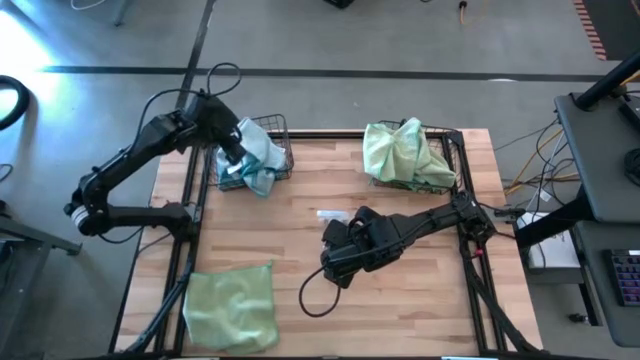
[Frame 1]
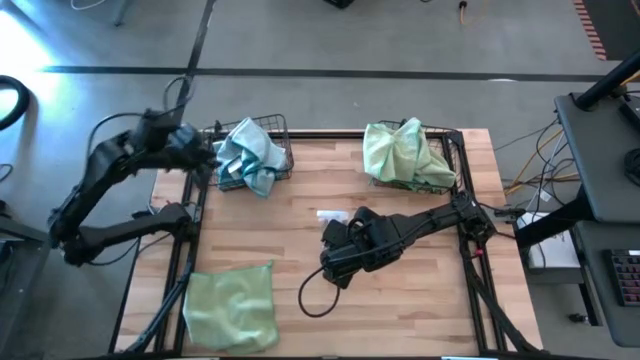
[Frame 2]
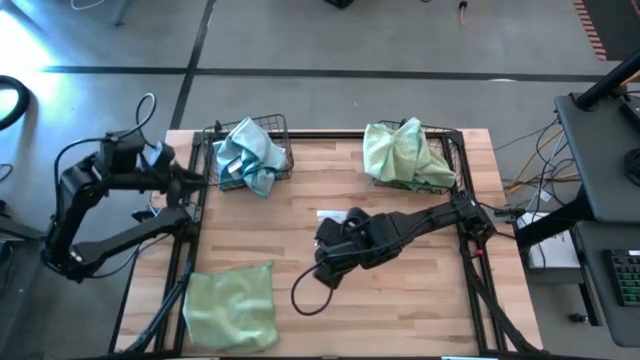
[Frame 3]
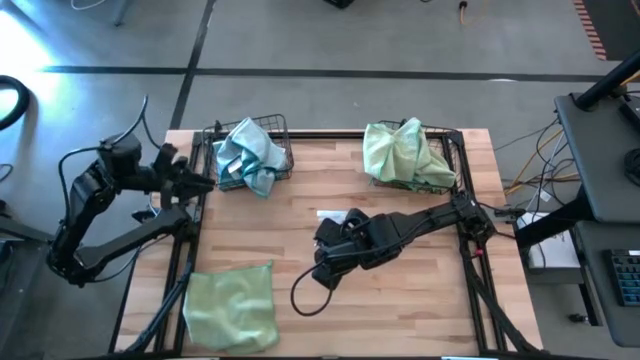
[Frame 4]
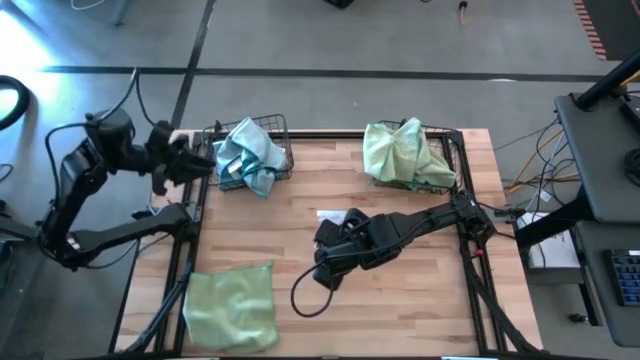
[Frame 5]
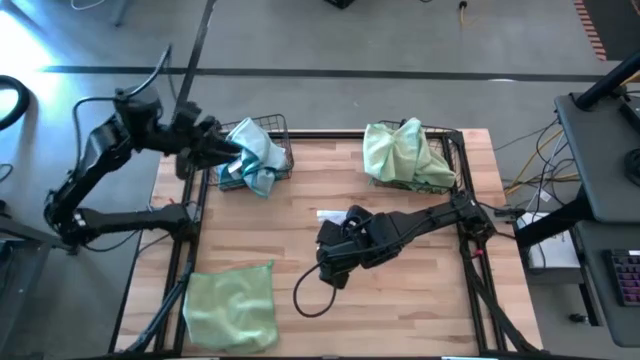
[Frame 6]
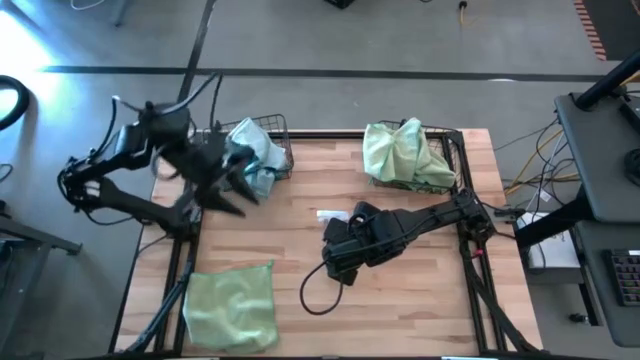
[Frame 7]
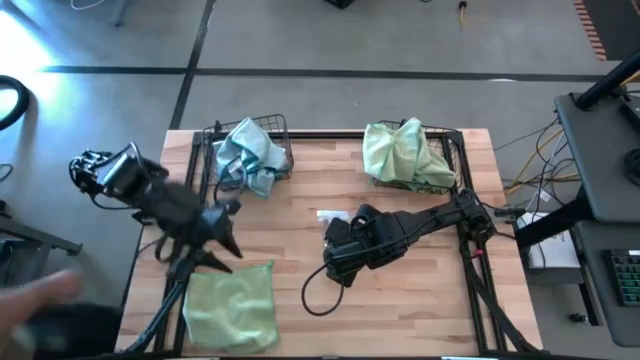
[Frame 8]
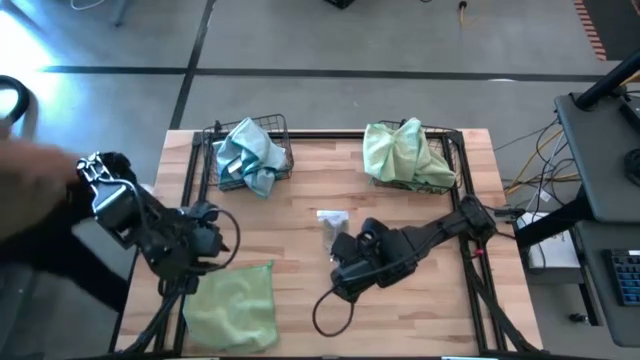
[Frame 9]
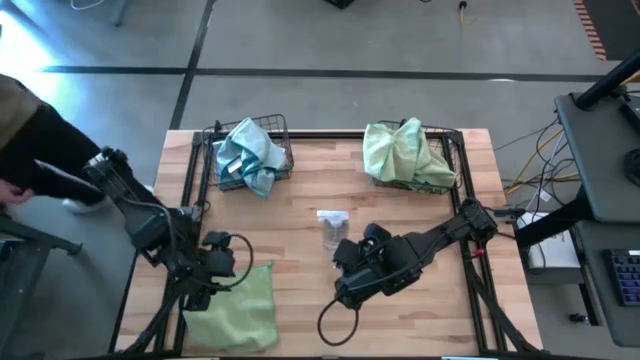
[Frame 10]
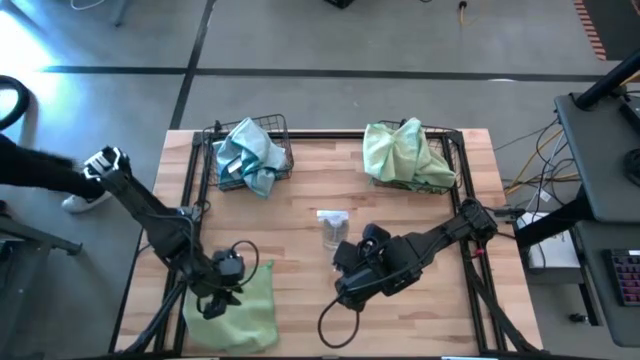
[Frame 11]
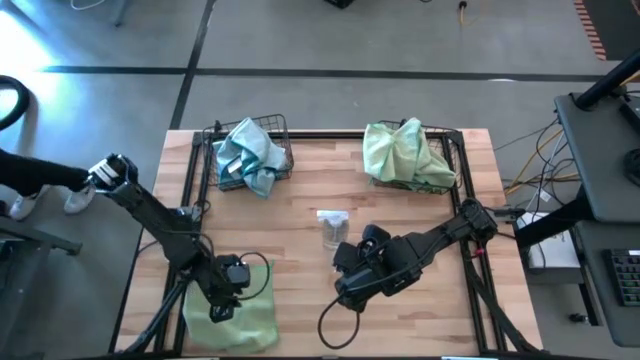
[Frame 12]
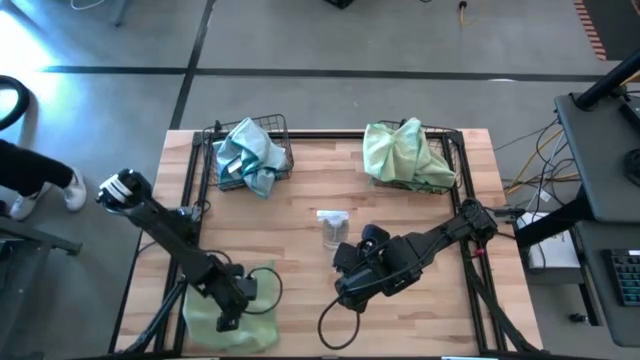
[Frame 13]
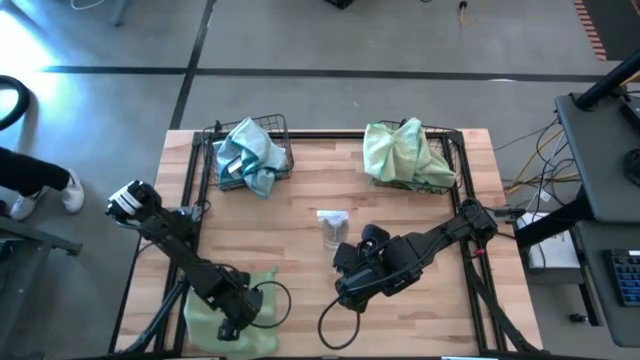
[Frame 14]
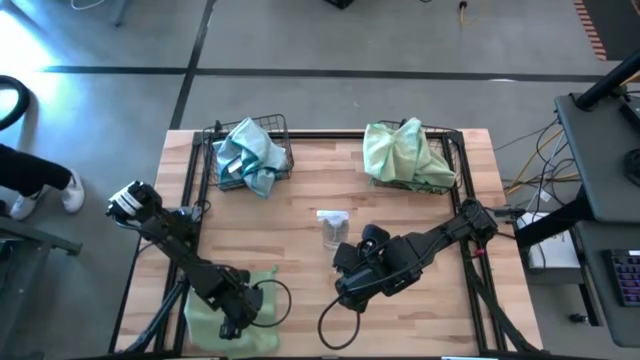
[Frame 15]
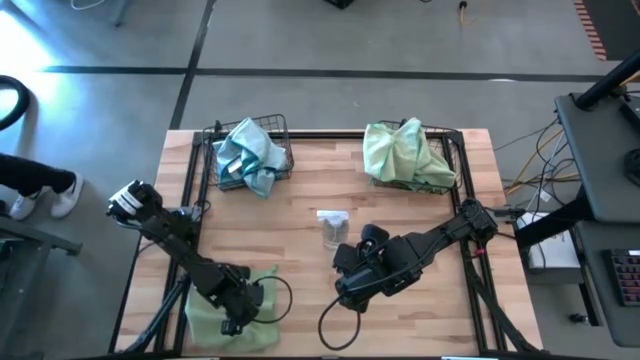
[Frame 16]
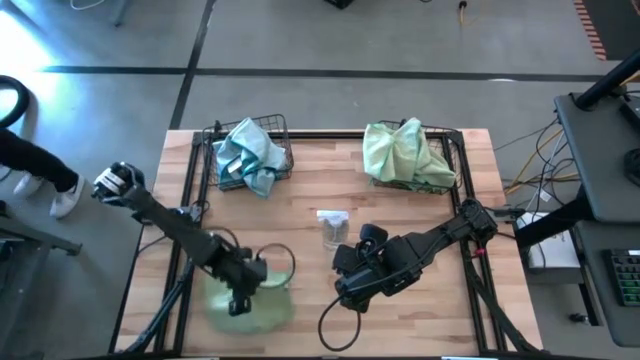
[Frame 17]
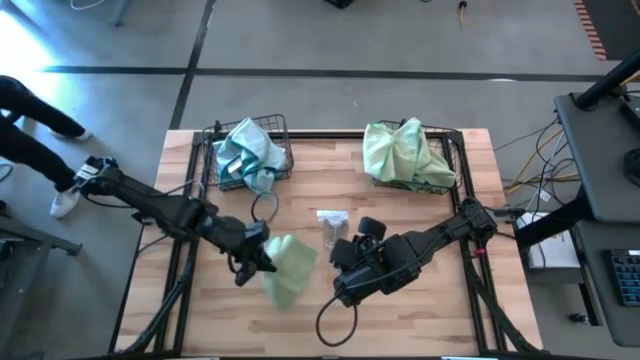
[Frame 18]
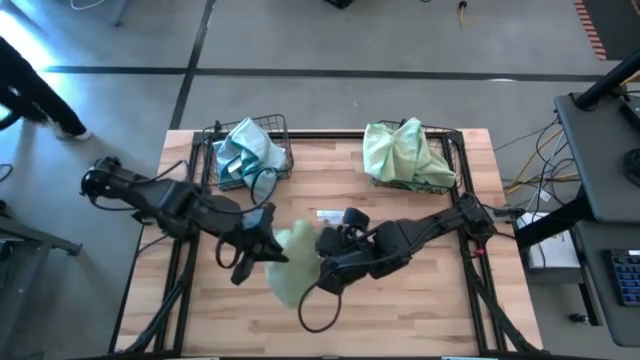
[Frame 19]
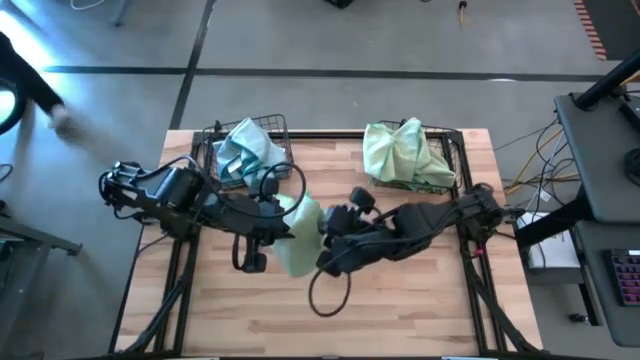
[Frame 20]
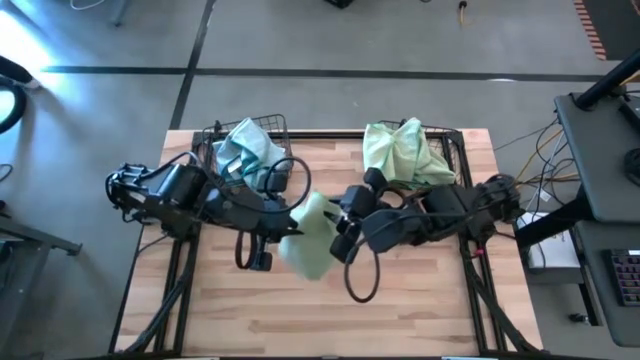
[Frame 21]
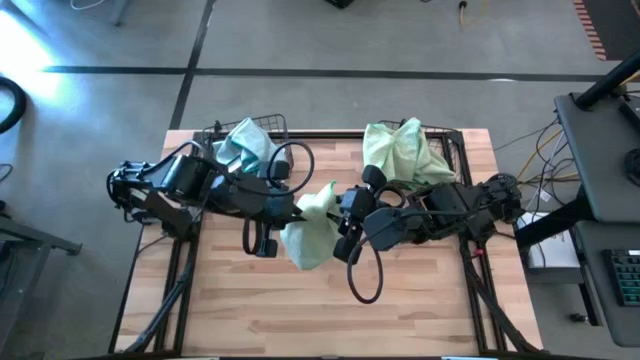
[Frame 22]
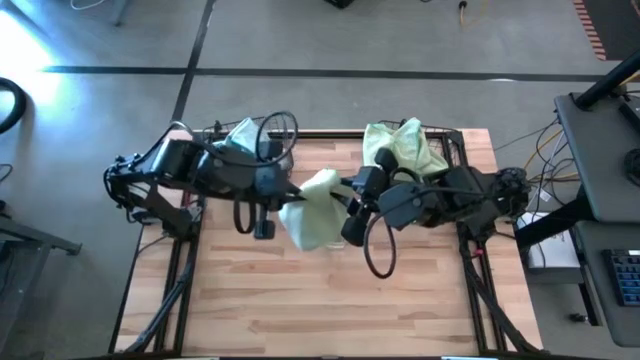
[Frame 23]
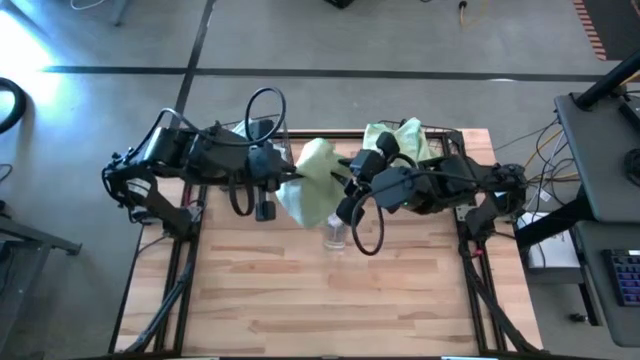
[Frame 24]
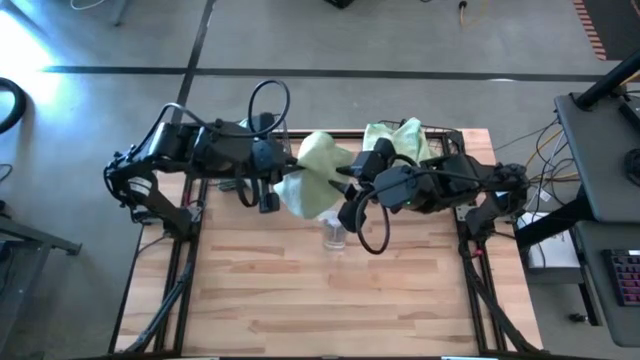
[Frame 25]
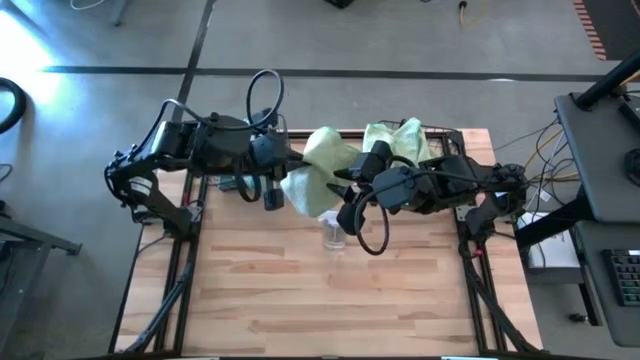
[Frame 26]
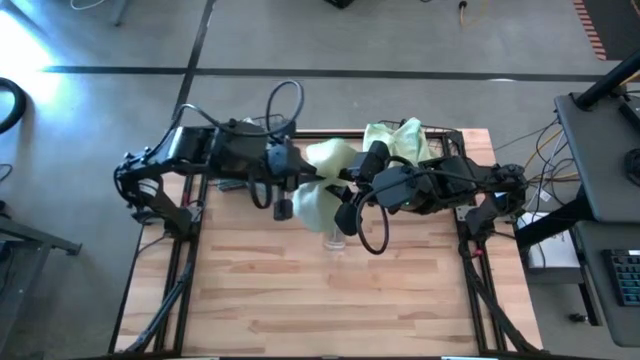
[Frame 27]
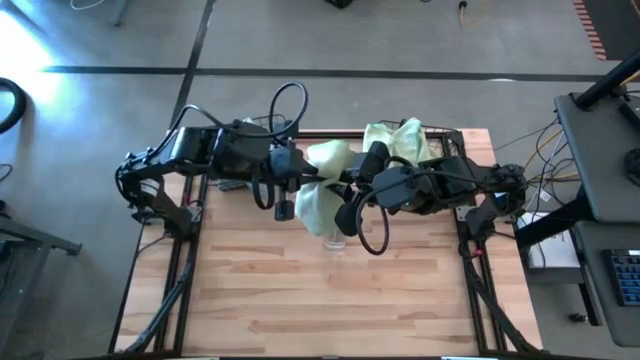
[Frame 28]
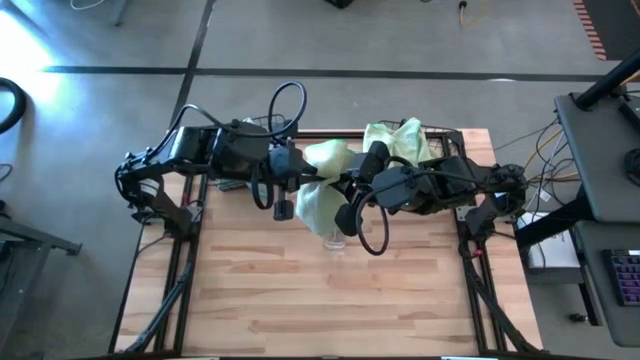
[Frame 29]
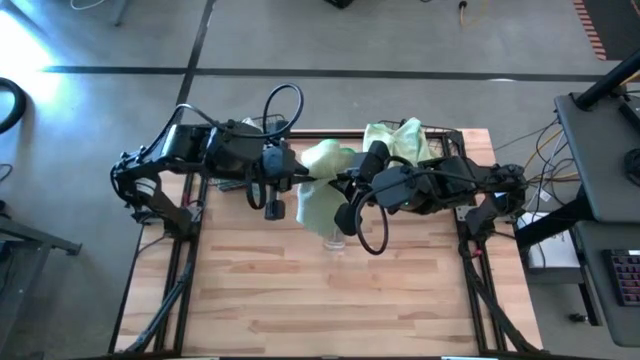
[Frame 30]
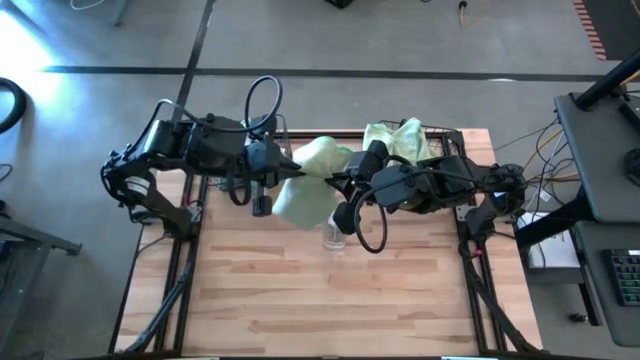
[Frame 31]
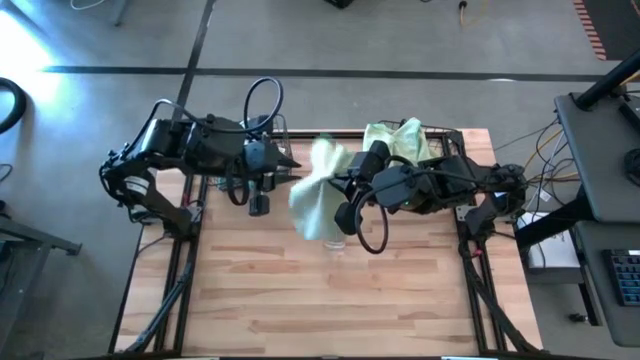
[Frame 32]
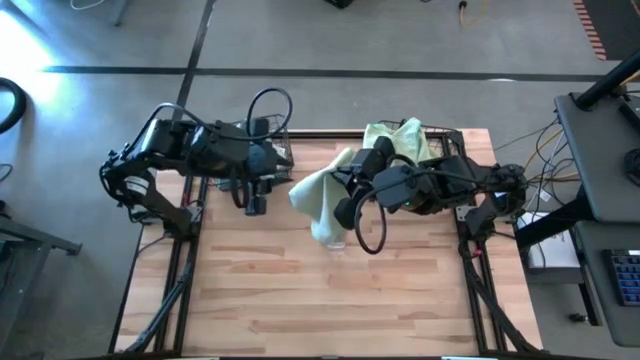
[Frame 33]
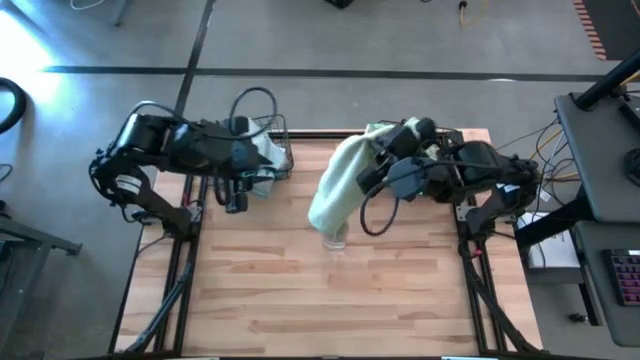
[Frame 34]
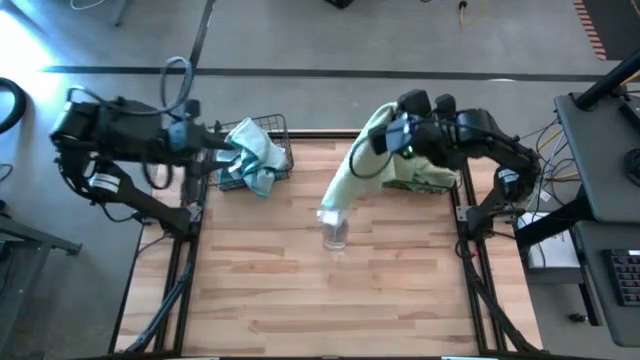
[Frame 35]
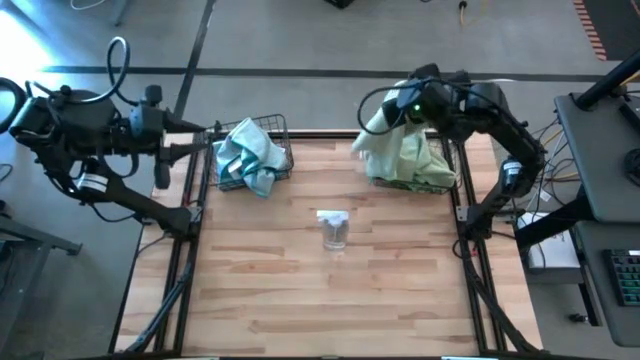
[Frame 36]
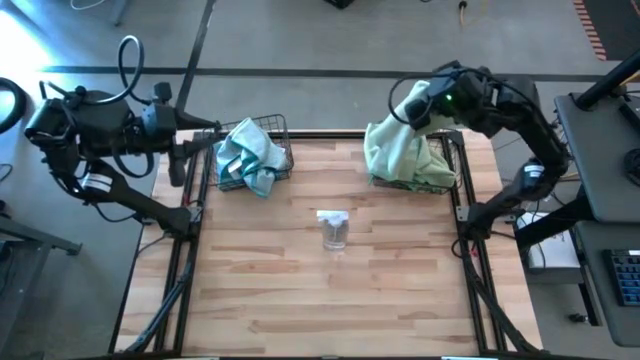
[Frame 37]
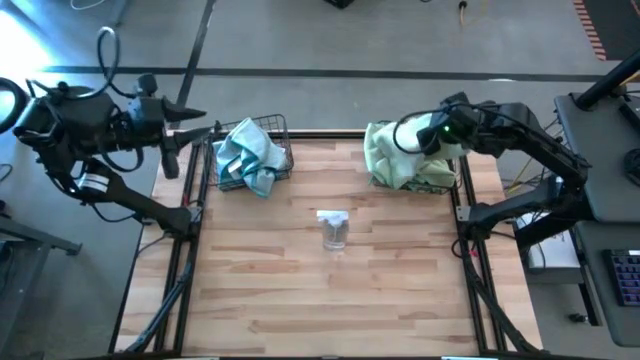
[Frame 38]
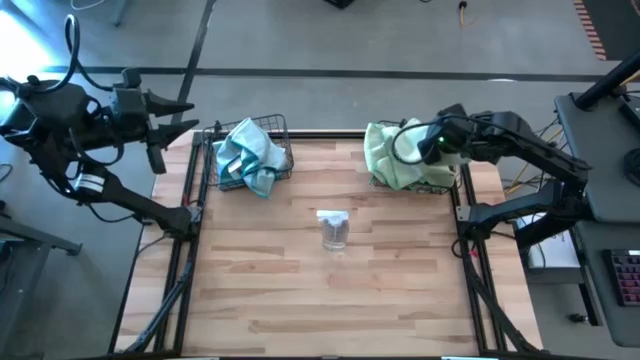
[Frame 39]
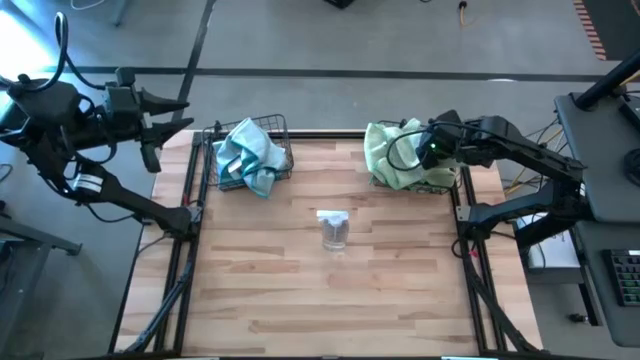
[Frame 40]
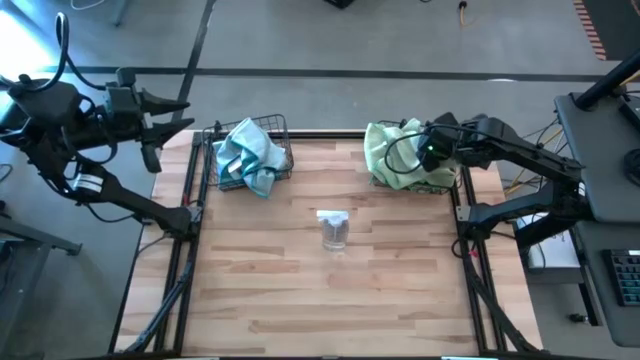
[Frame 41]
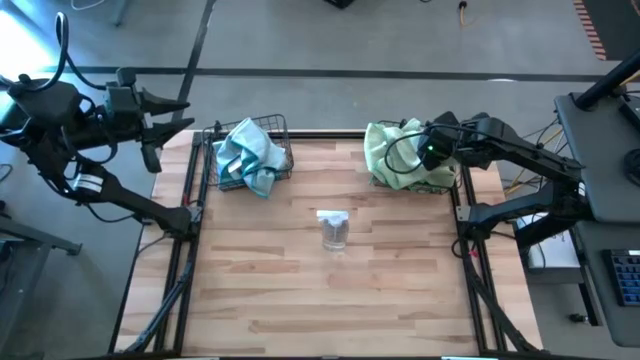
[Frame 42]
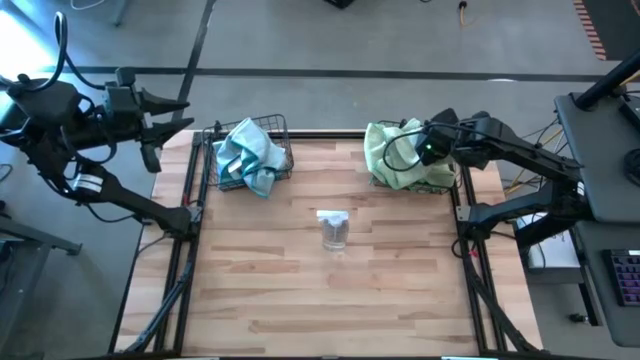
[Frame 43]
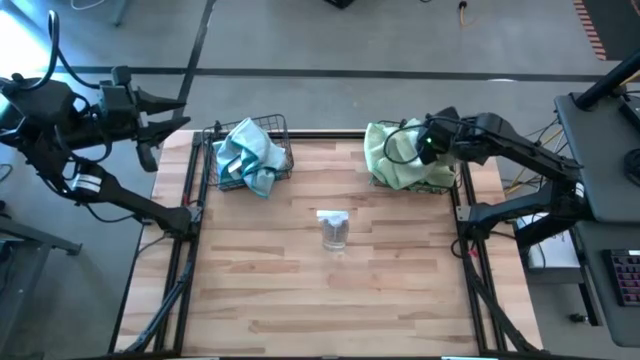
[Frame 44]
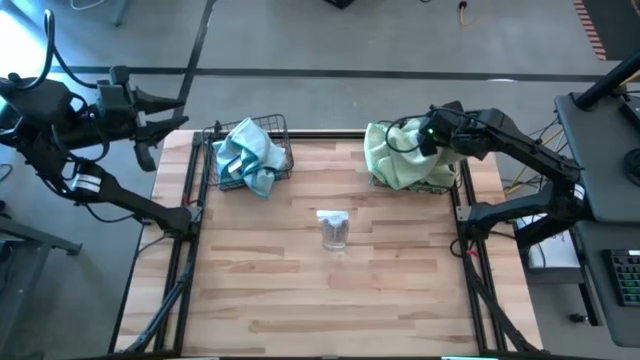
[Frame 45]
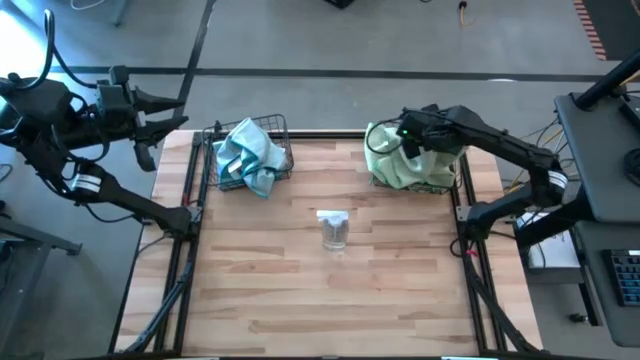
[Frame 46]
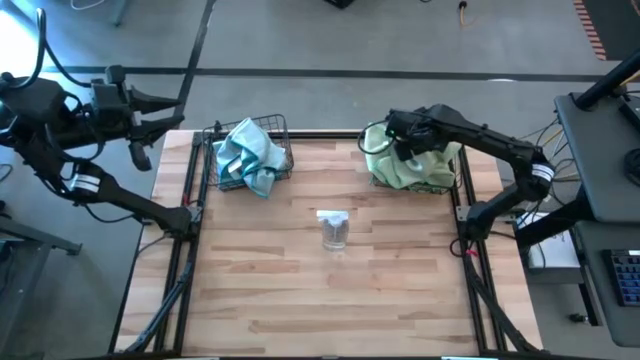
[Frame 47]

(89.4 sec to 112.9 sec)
Task: Sort microfiber towel by color & place in baskets
Put the green towel into the right wire basket
